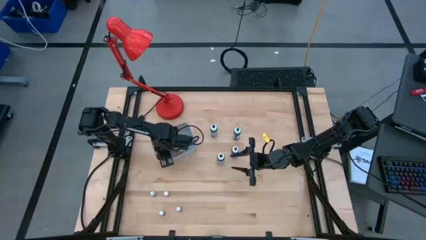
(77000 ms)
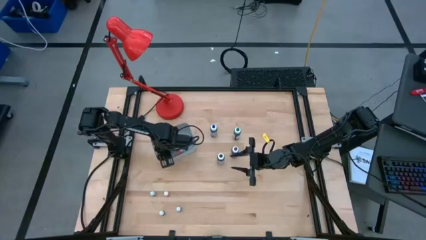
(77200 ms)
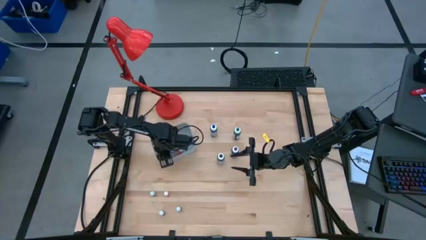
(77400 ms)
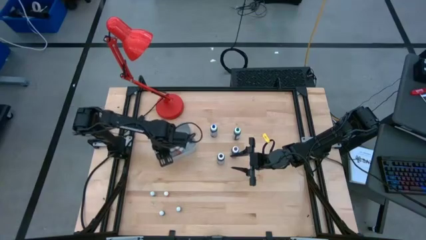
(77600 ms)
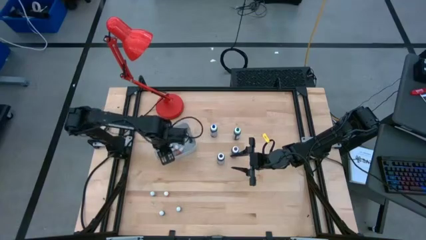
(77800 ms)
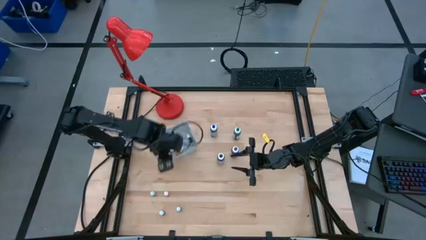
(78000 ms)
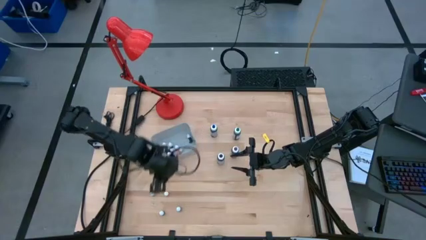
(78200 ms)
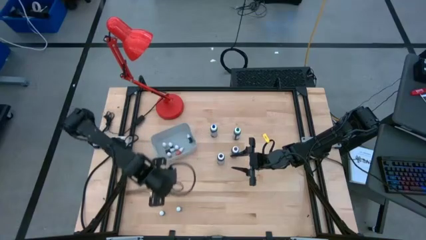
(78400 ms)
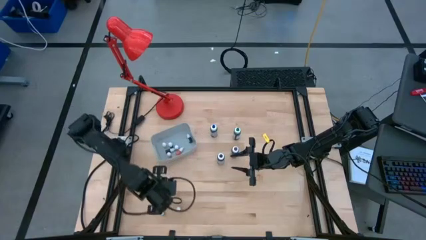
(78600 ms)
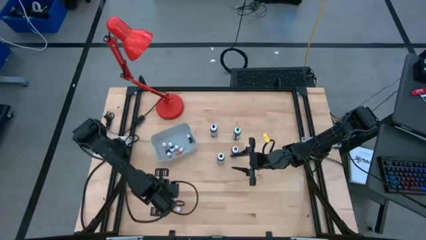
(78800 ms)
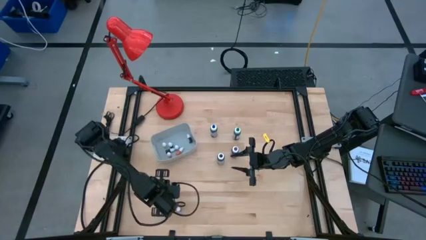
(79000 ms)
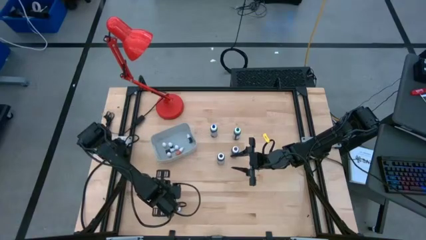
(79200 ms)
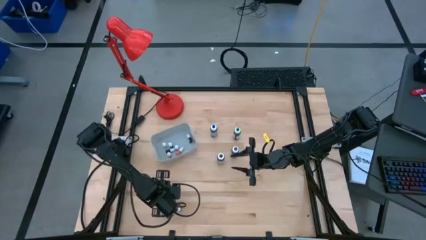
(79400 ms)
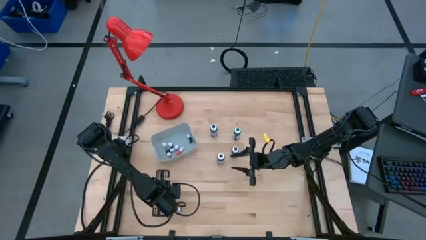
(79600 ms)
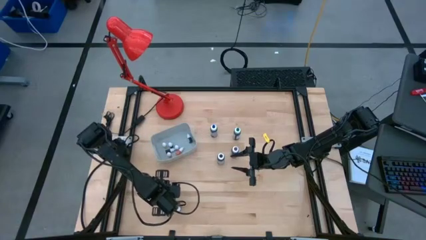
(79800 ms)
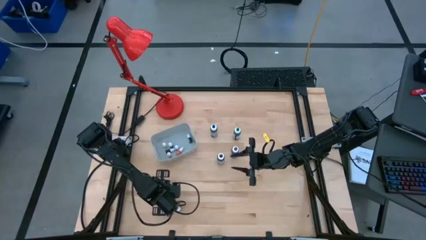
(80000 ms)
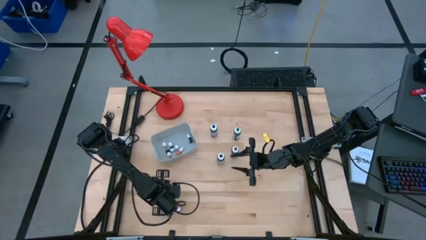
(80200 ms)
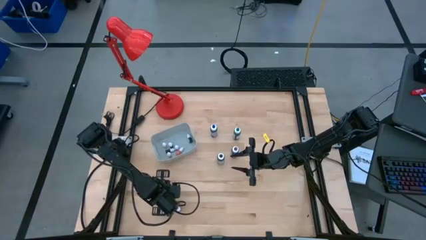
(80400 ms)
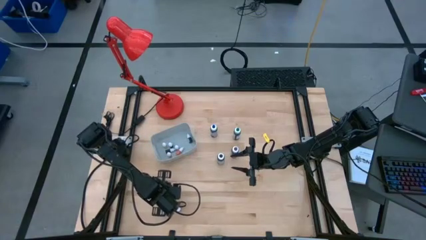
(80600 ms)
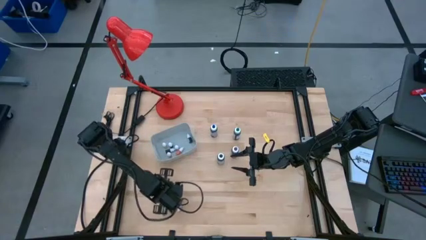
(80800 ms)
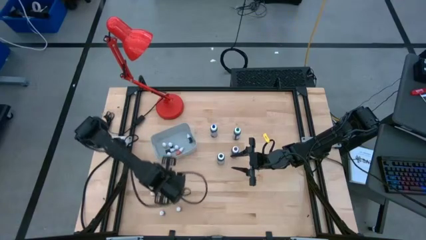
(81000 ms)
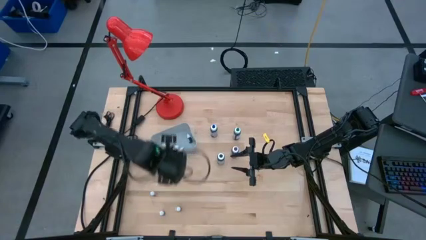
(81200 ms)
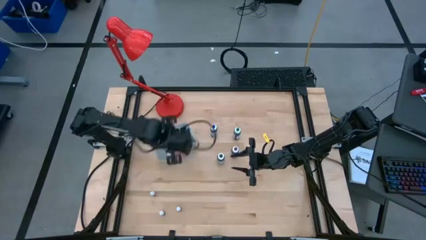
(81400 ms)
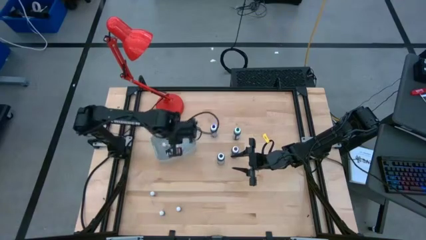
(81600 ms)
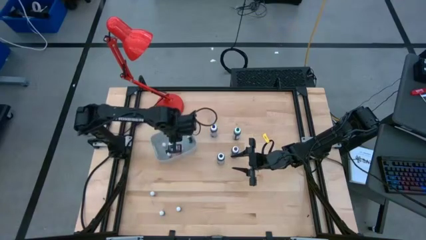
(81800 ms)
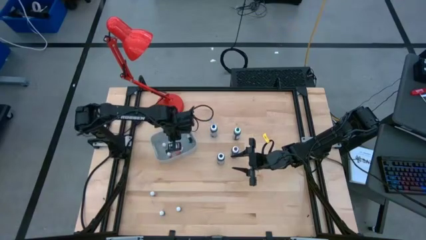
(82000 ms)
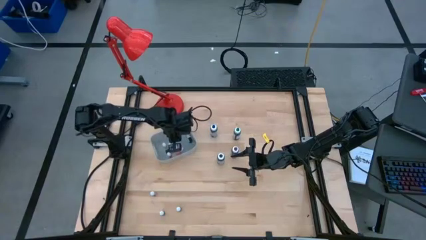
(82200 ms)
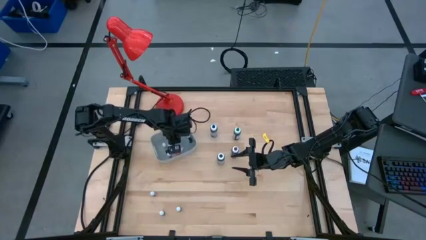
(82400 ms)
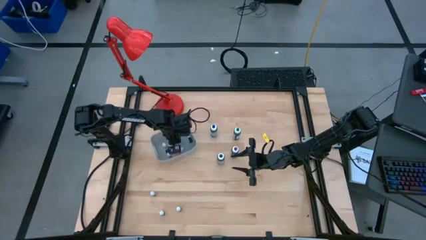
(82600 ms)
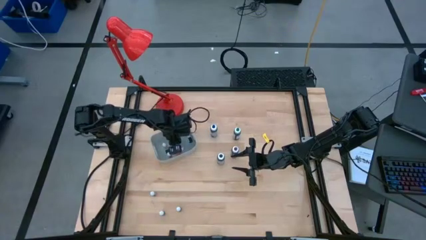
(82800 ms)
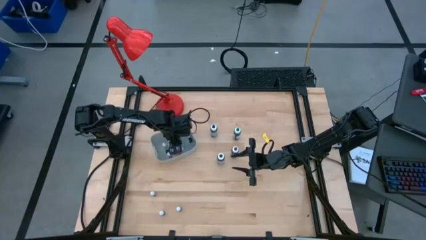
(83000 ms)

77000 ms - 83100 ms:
Task: Pick & Place food coloring
Put the small orange coloring bottle into the gray container

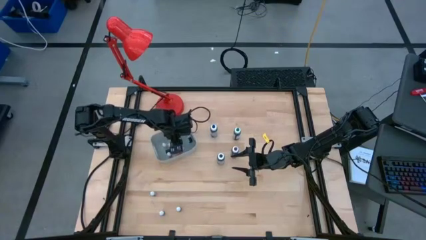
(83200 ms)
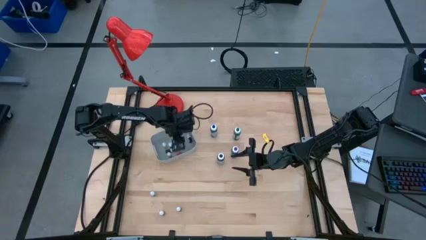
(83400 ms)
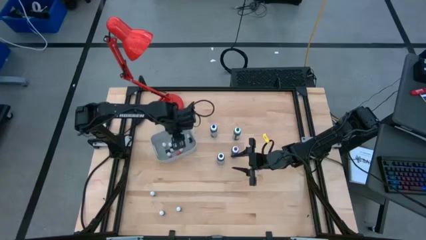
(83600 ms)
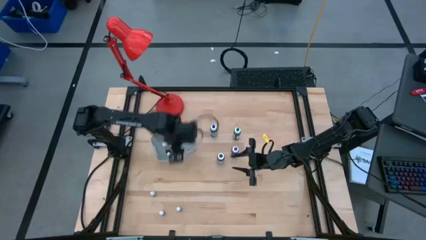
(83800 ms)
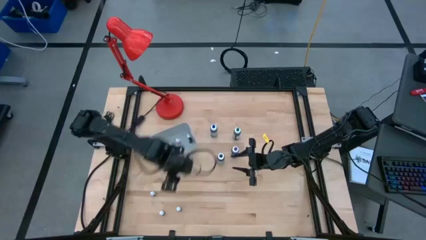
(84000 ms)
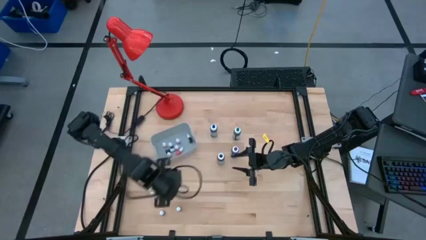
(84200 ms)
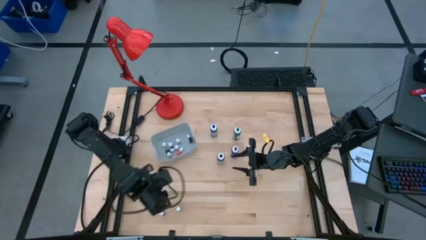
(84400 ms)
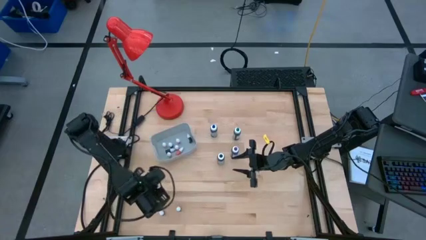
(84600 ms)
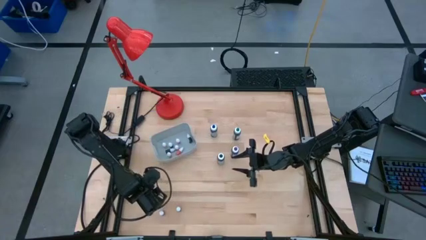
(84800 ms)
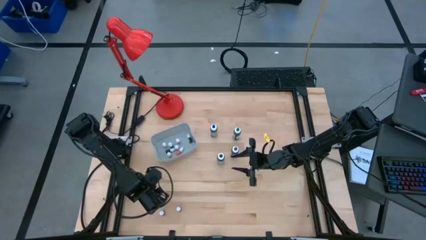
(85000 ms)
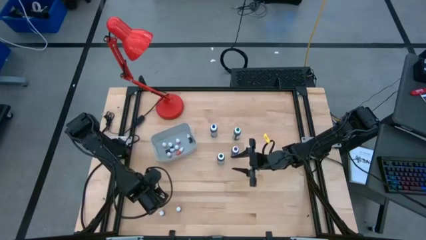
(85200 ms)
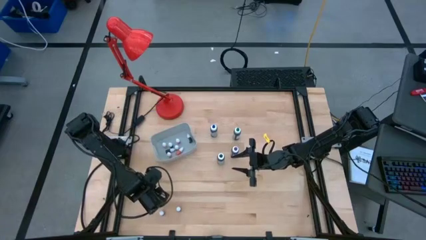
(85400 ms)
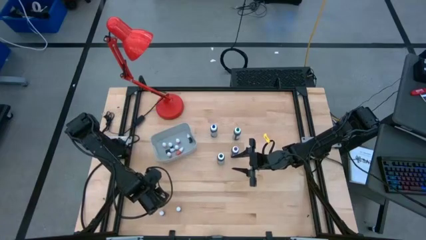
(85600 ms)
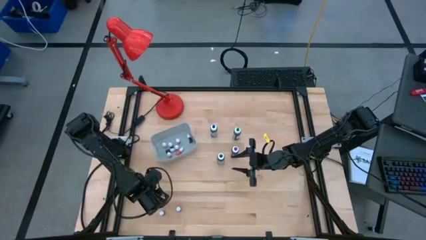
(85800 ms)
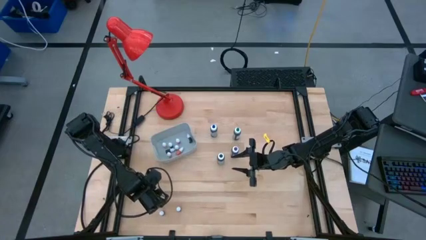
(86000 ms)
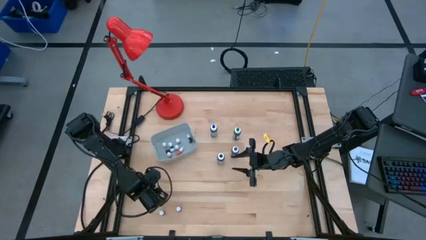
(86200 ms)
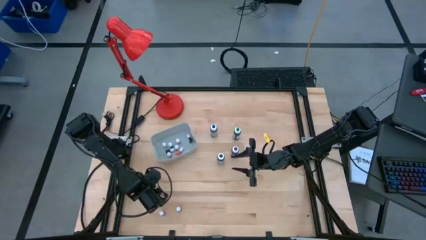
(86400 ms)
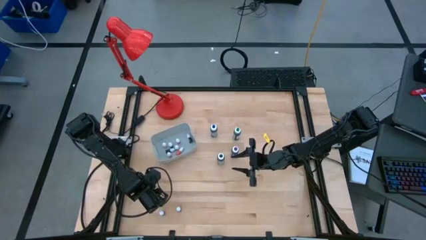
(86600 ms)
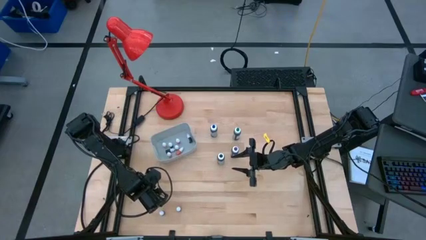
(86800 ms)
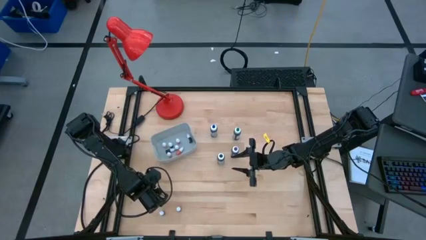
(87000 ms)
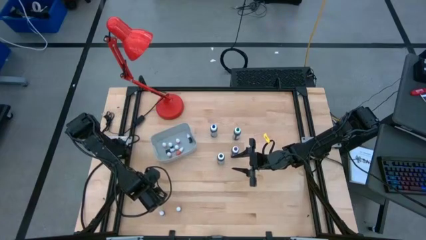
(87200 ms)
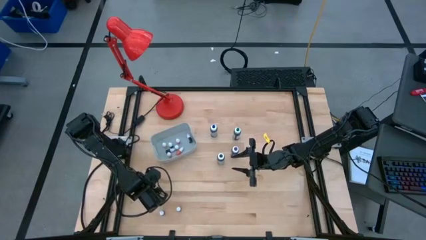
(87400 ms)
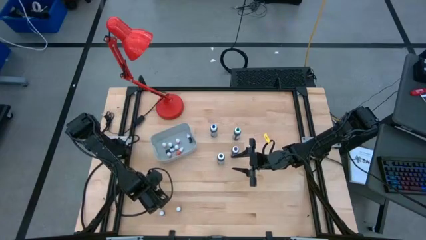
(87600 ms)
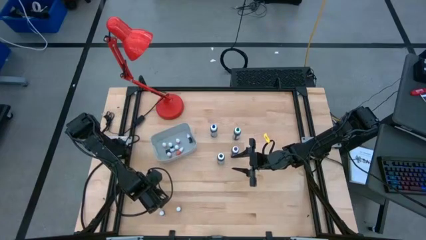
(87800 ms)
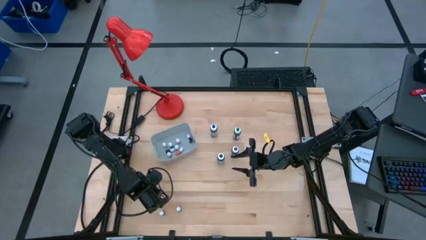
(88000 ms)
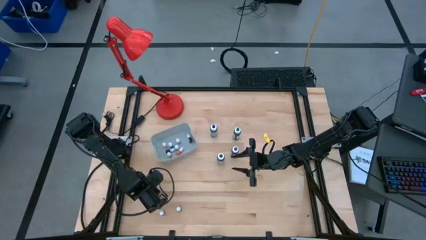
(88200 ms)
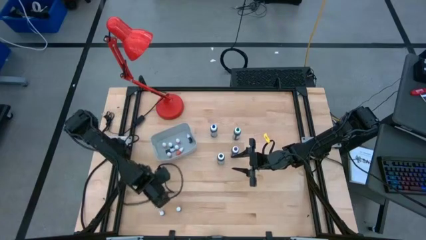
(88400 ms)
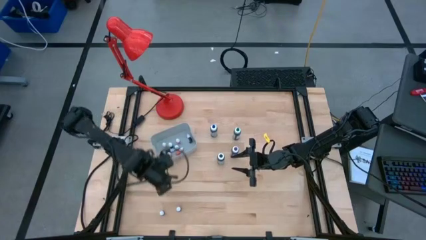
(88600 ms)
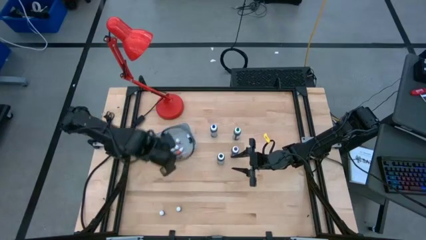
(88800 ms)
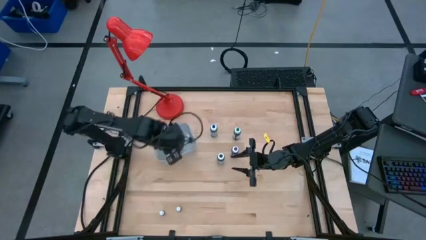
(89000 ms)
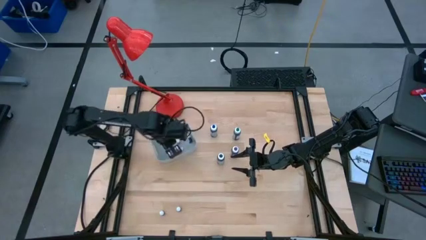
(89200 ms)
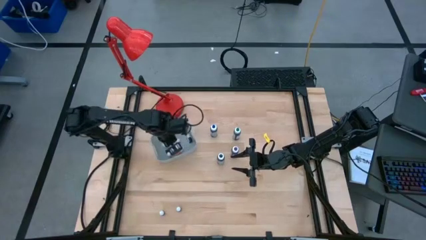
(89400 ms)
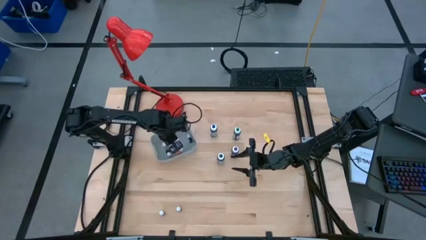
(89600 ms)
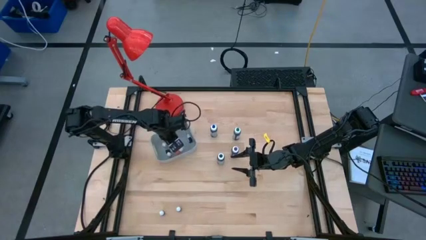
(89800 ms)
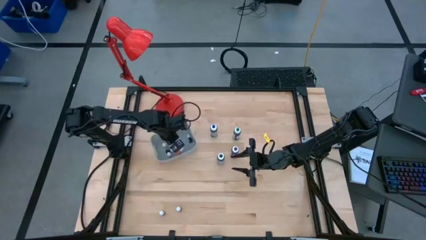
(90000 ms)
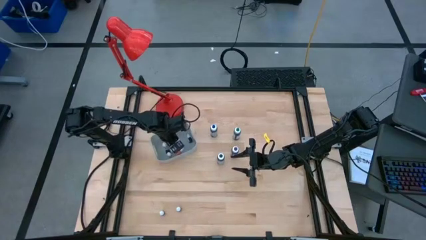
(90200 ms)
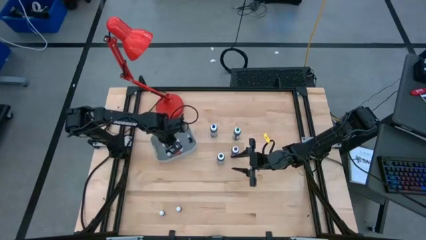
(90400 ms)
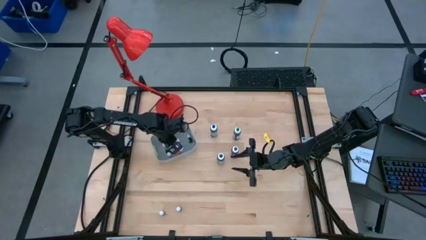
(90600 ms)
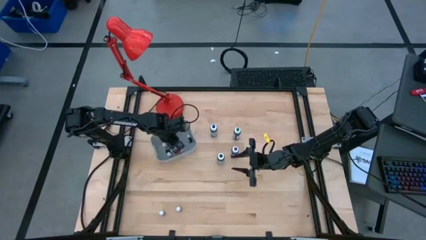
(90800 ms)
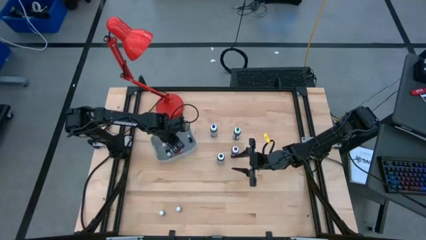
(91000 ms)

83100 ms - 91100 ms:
Put the top small black coloring bottle into the gray container
